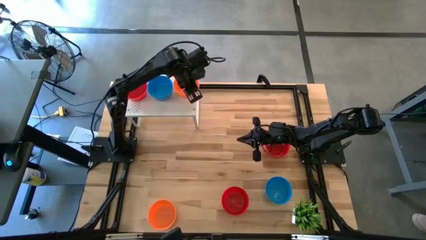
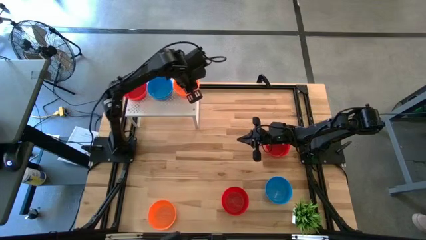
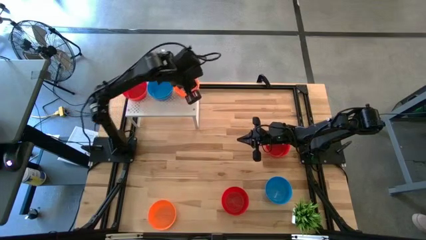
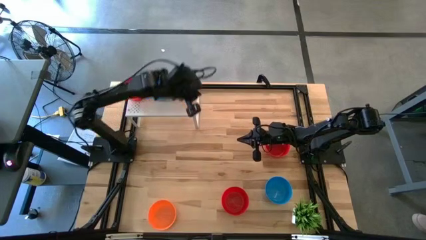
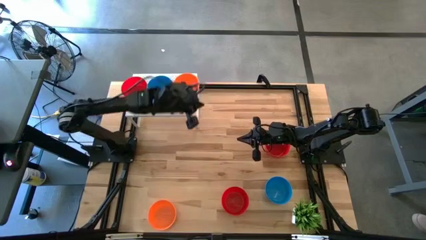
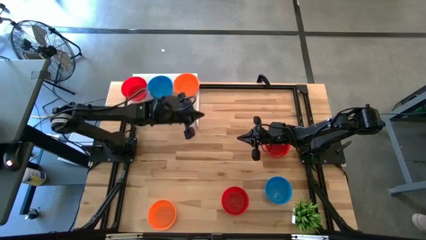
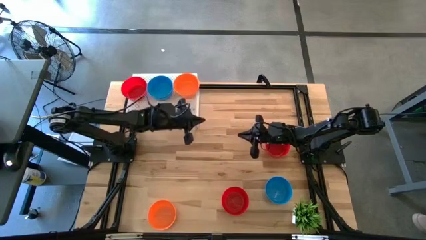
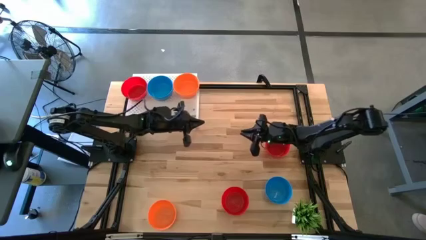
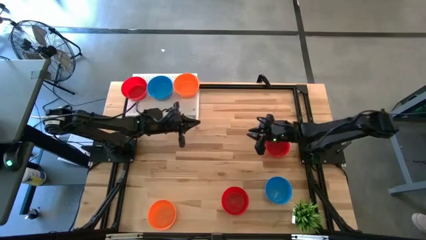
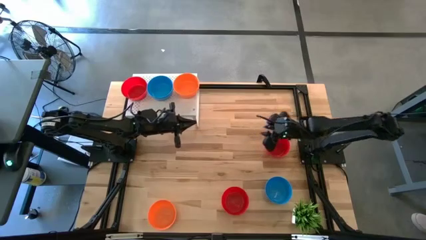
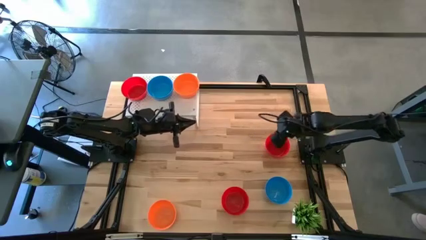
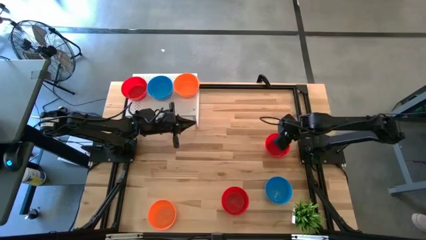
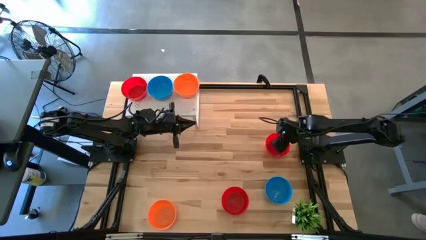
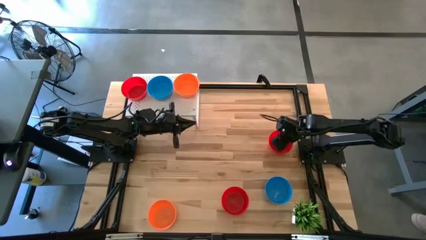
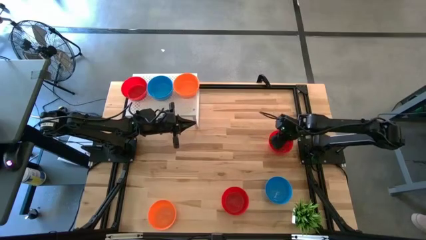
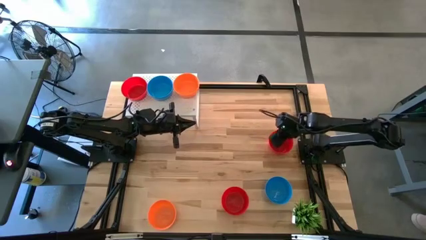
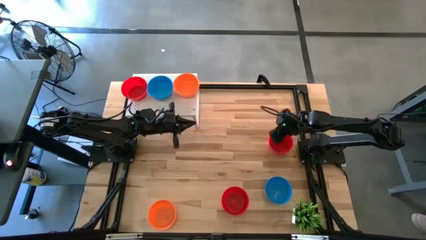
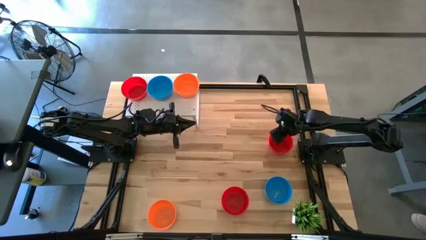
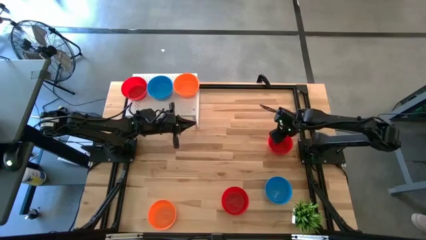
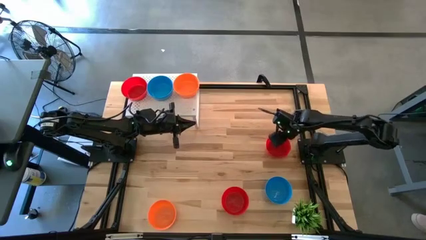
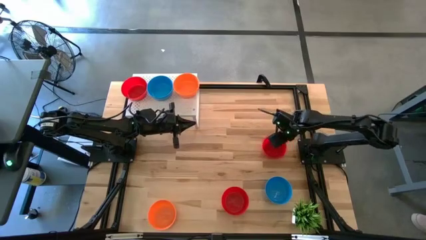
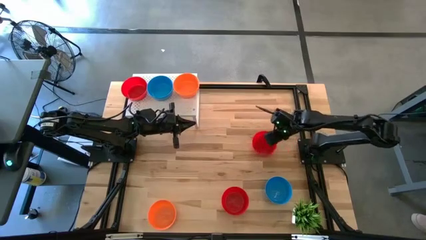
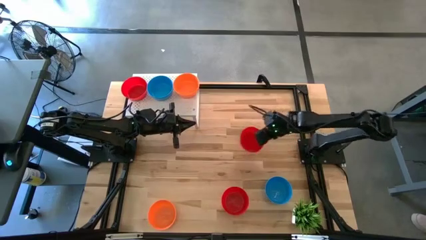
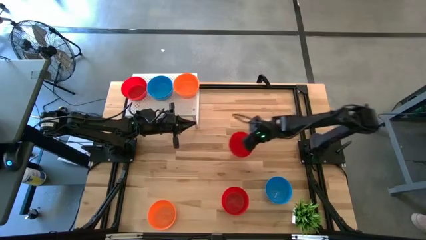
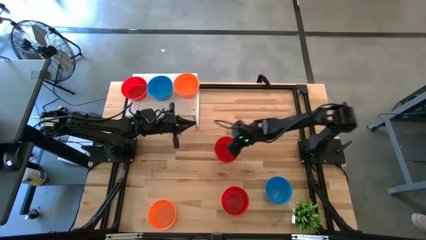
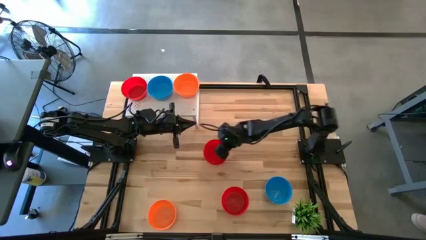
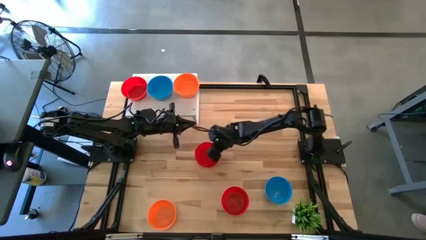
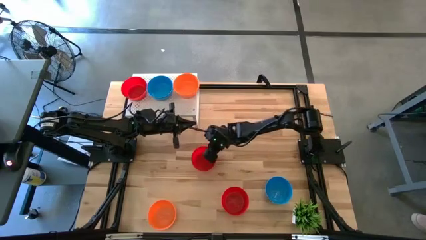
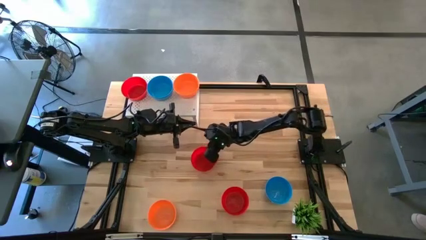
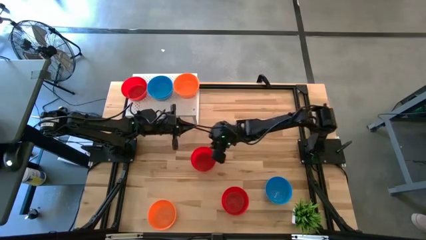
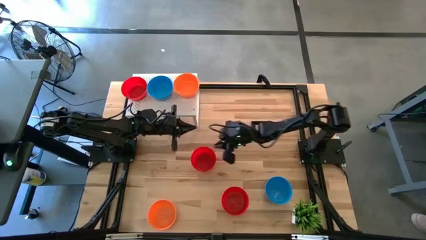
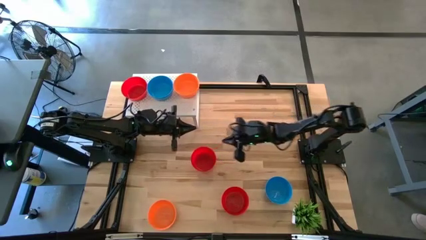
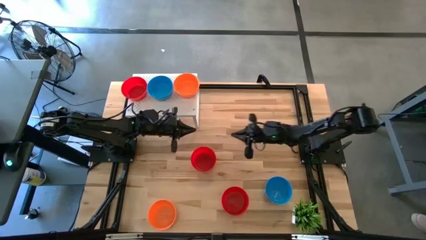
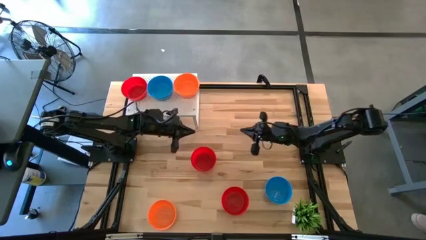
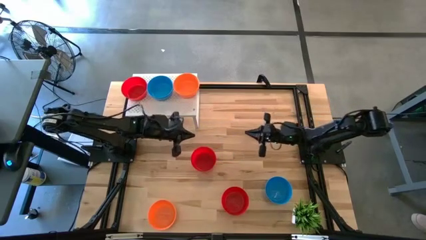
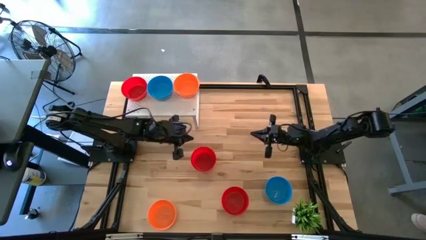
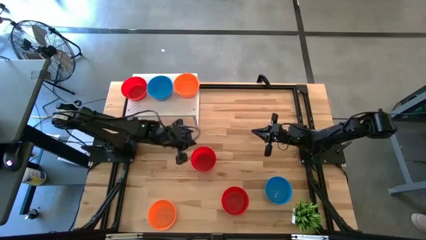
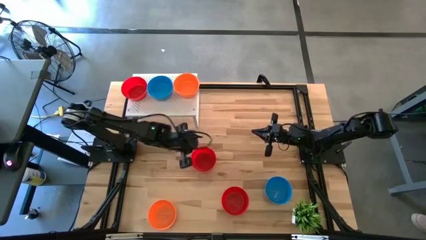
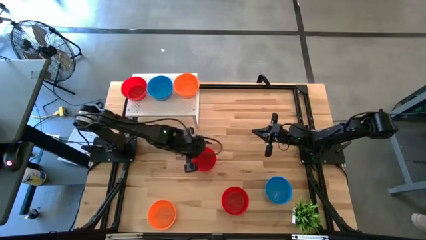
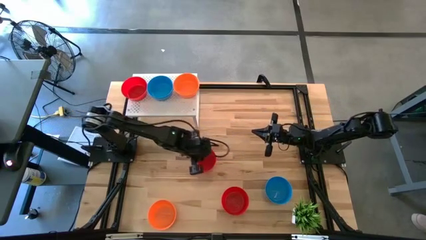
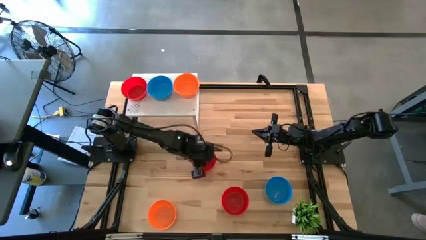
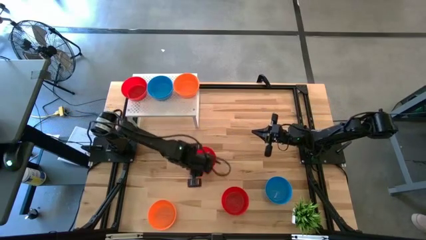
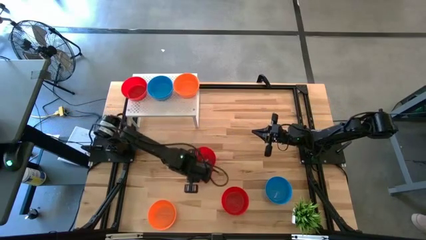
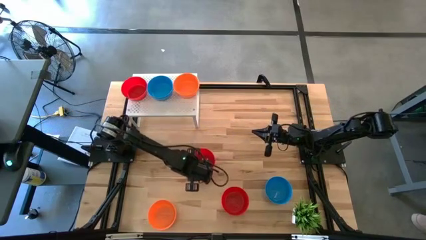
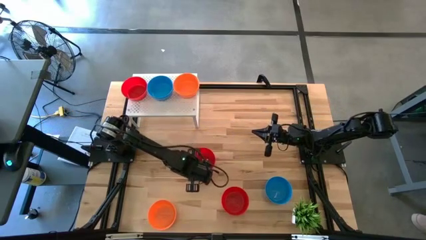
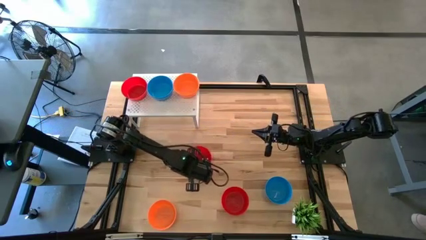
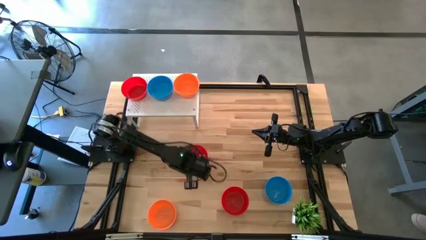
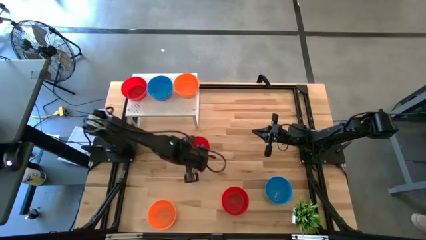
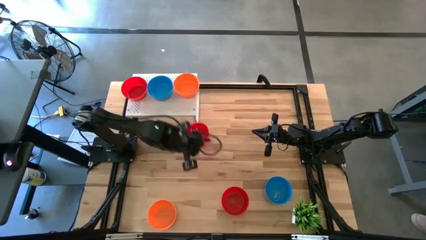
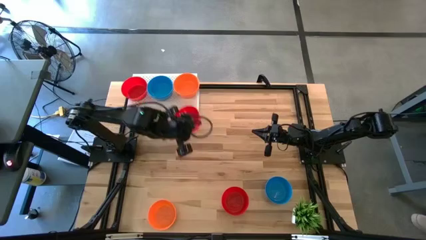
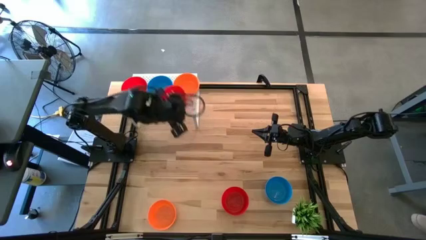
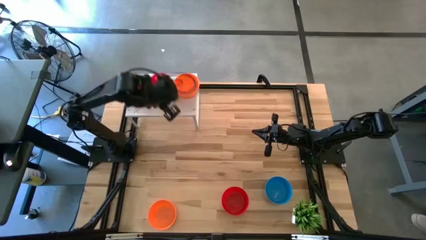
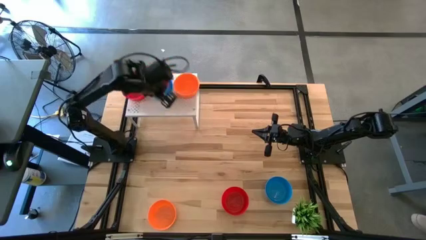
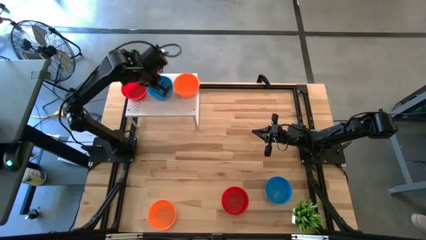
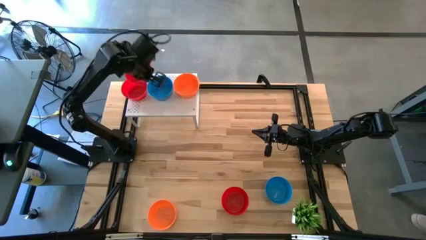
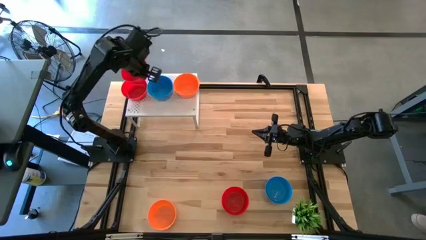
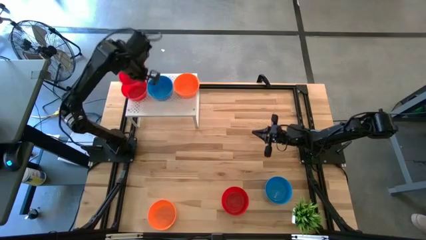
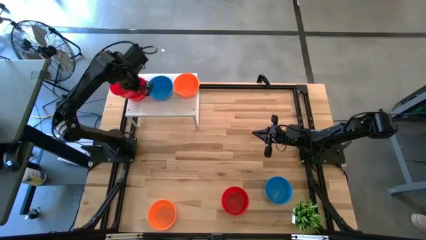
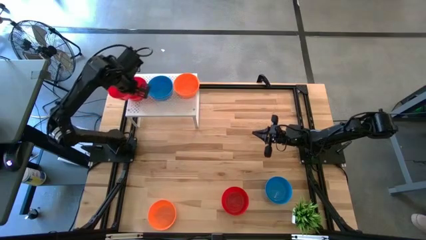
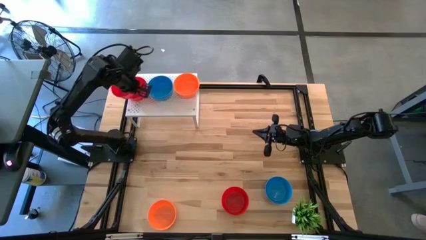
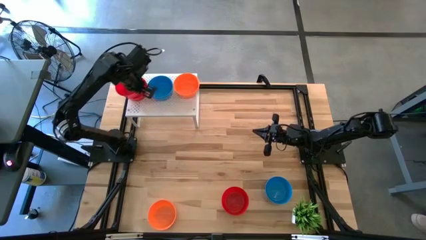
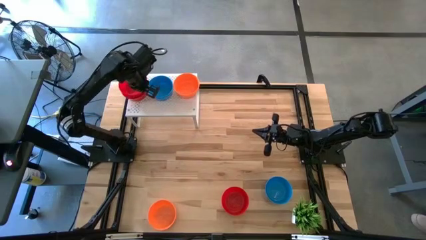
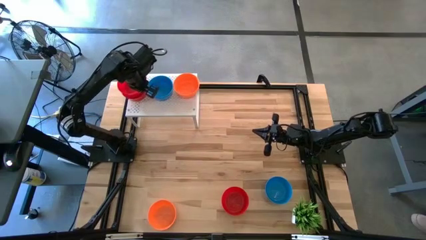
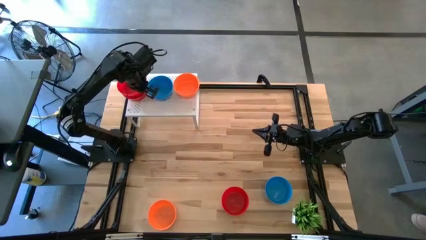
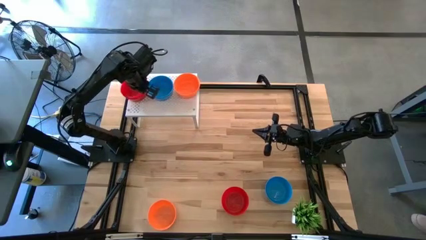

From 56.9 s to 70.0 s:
Task: Pick & Place Mini bowls
Stack the top red bowl on the red bowl on the shelf
